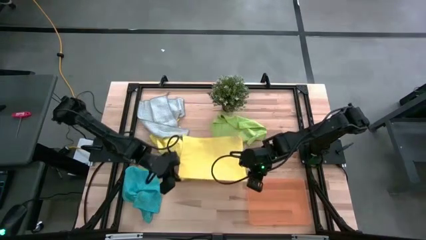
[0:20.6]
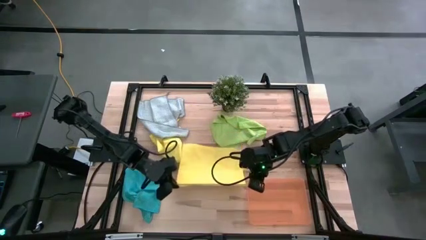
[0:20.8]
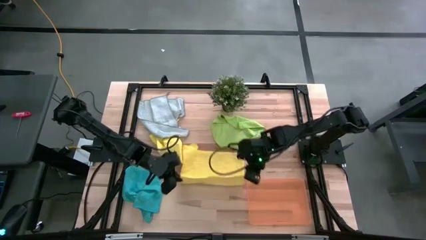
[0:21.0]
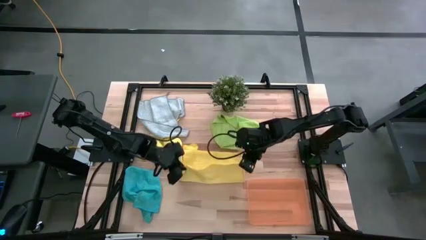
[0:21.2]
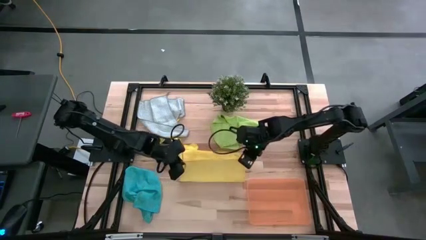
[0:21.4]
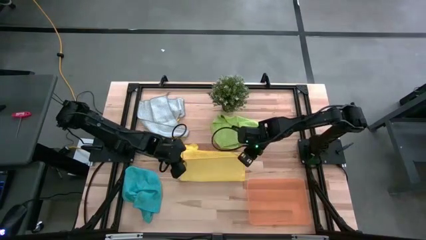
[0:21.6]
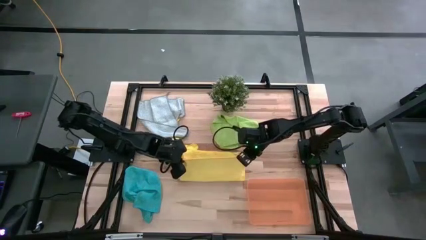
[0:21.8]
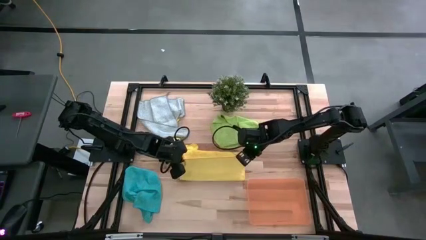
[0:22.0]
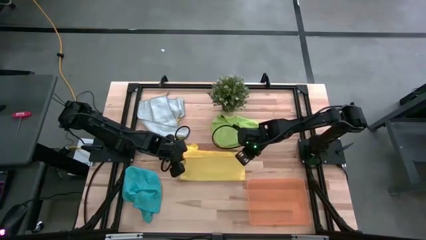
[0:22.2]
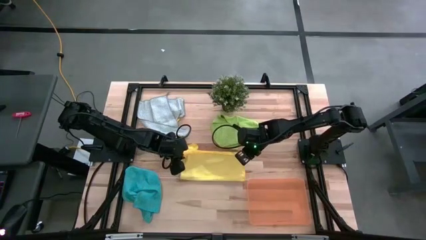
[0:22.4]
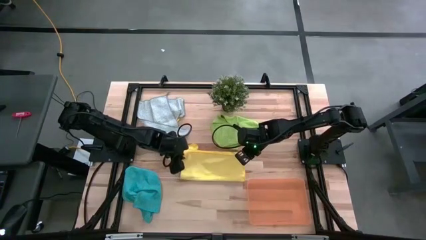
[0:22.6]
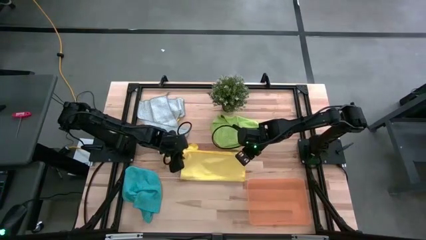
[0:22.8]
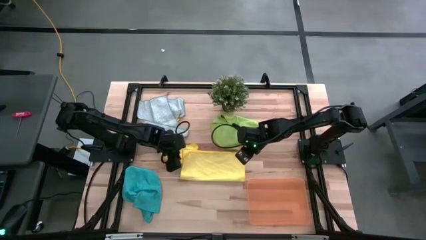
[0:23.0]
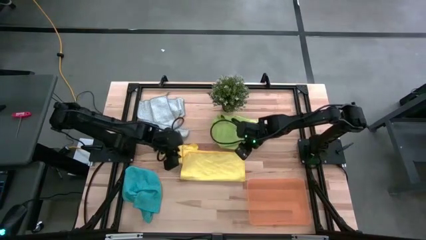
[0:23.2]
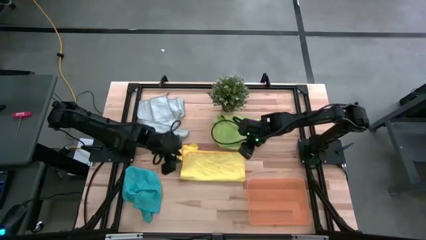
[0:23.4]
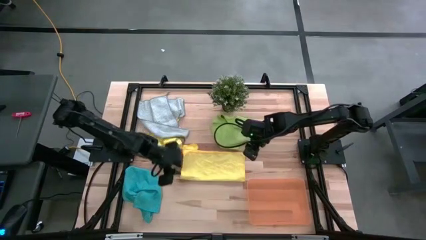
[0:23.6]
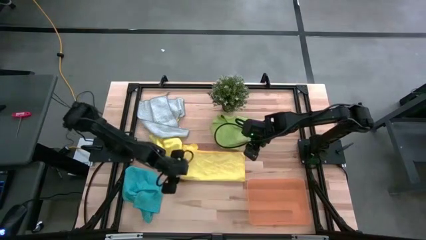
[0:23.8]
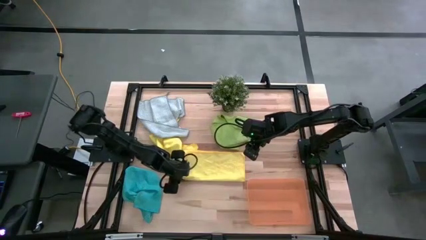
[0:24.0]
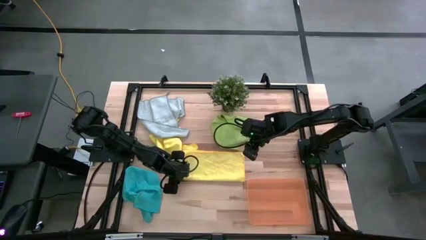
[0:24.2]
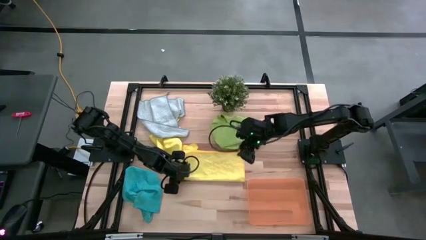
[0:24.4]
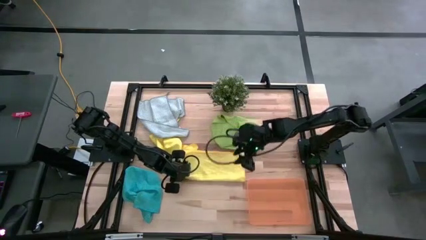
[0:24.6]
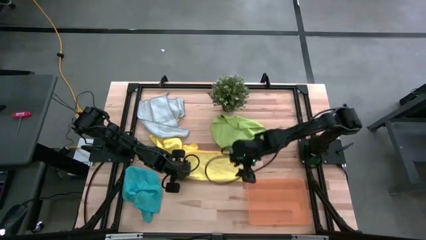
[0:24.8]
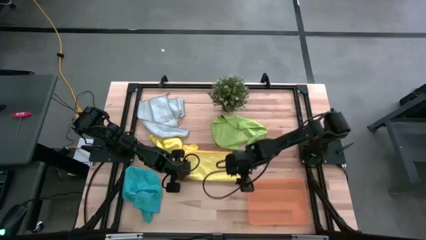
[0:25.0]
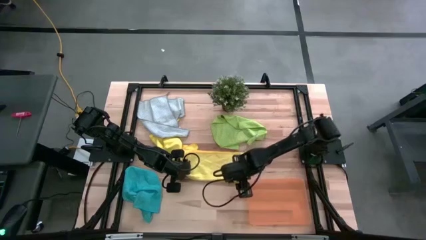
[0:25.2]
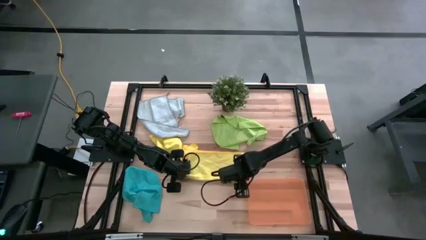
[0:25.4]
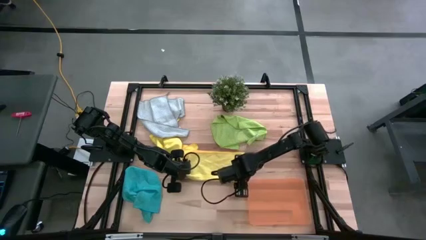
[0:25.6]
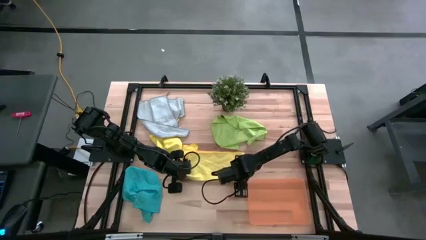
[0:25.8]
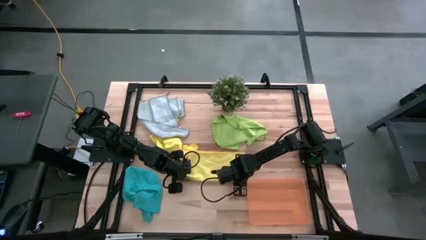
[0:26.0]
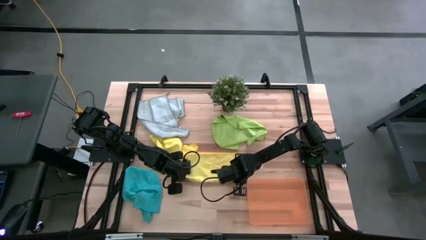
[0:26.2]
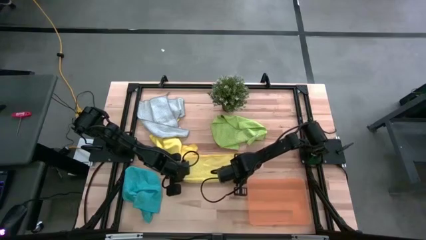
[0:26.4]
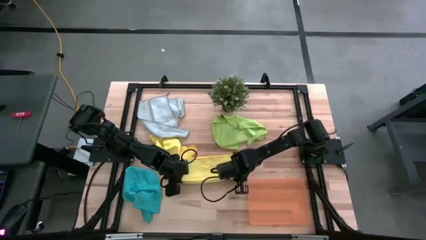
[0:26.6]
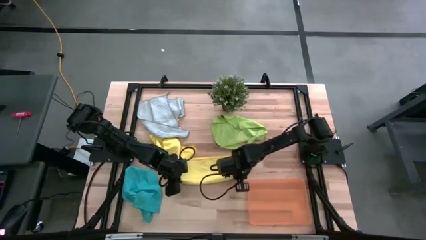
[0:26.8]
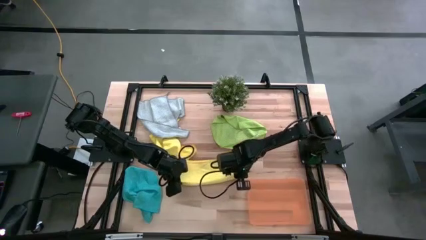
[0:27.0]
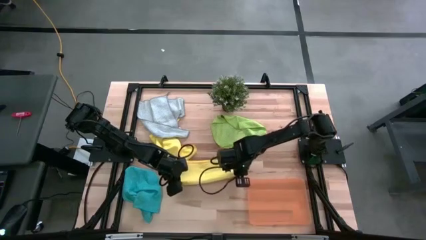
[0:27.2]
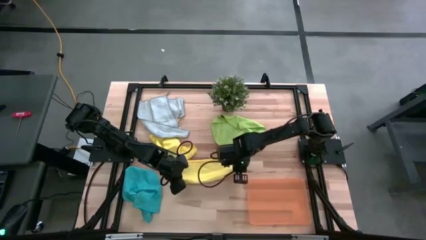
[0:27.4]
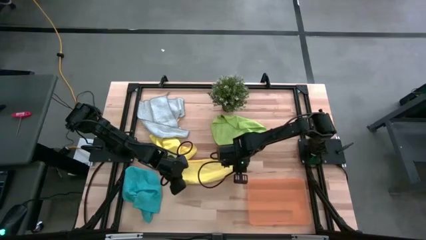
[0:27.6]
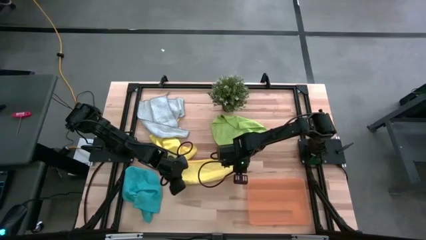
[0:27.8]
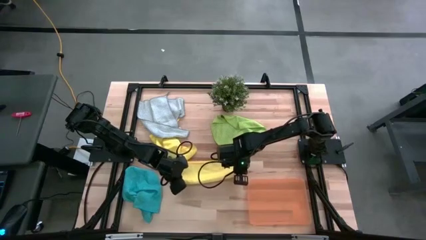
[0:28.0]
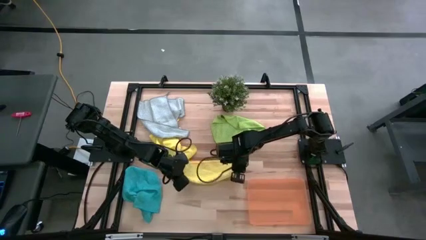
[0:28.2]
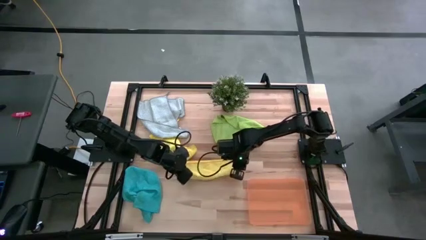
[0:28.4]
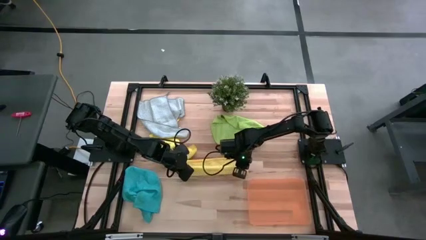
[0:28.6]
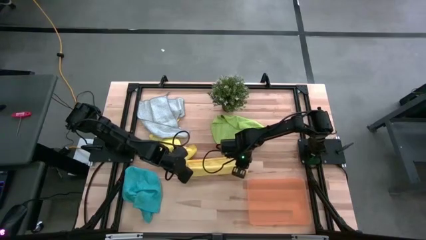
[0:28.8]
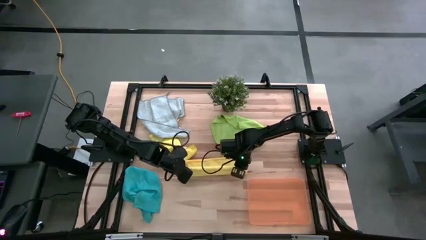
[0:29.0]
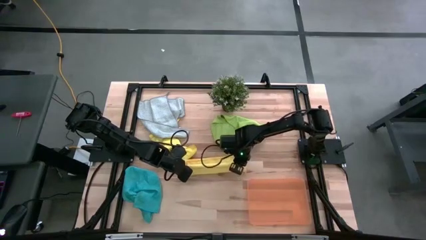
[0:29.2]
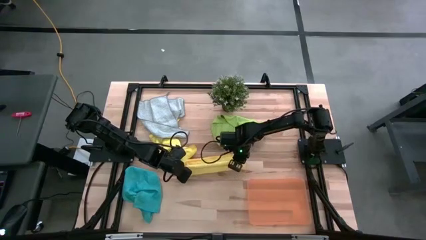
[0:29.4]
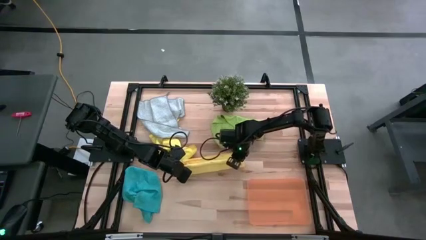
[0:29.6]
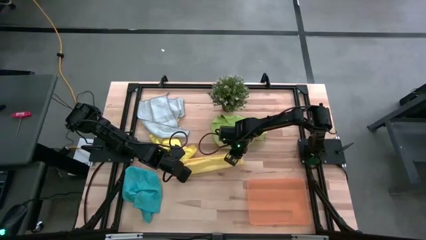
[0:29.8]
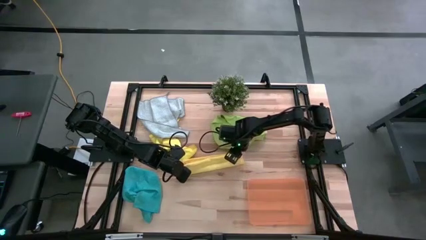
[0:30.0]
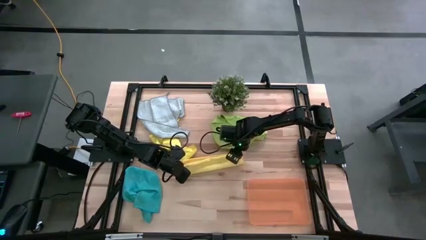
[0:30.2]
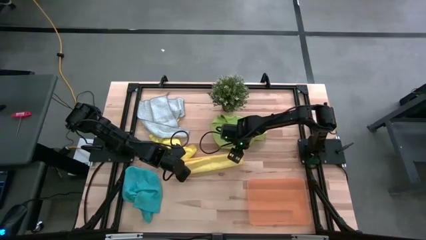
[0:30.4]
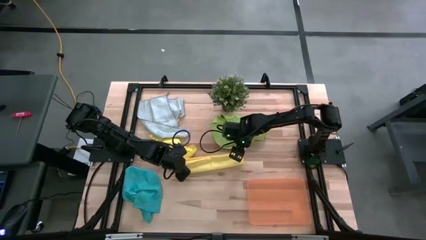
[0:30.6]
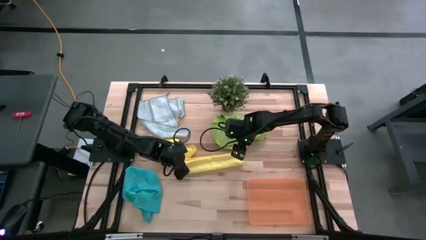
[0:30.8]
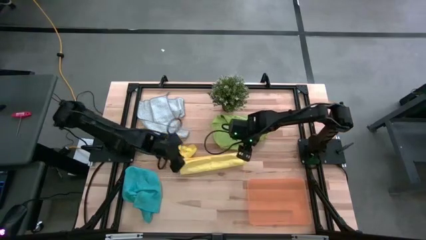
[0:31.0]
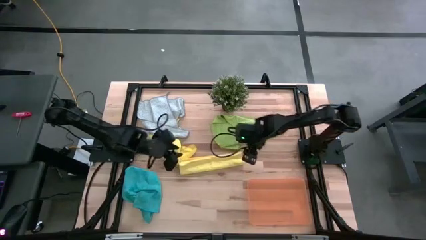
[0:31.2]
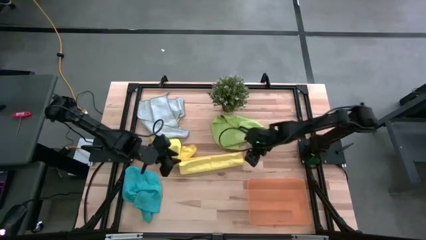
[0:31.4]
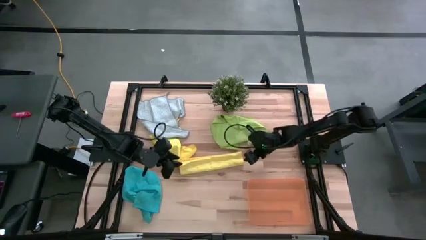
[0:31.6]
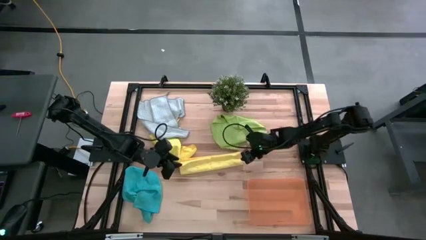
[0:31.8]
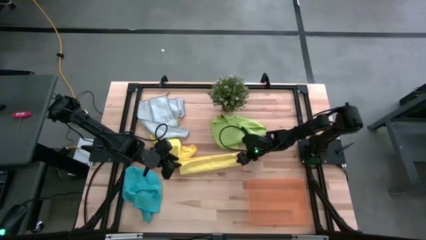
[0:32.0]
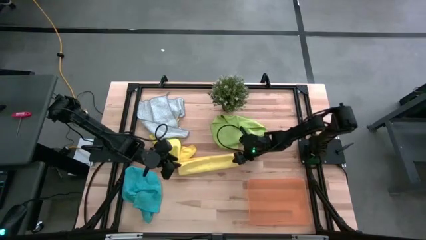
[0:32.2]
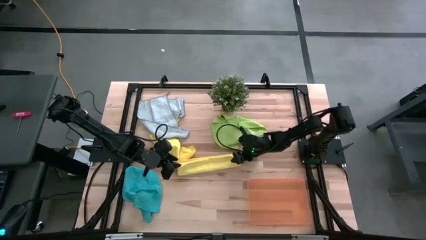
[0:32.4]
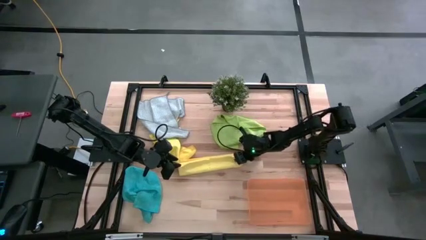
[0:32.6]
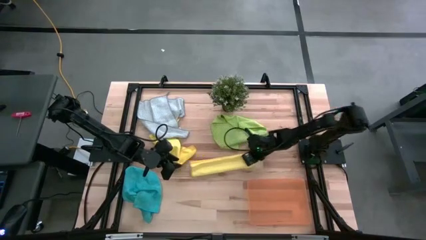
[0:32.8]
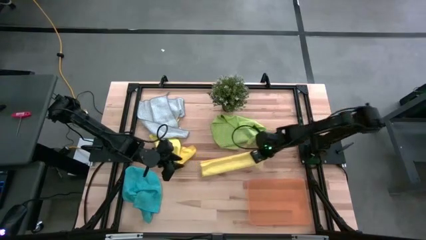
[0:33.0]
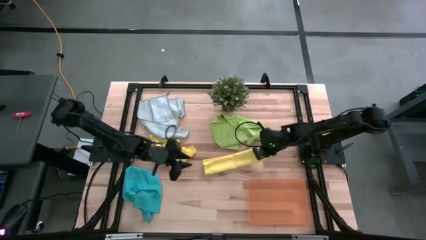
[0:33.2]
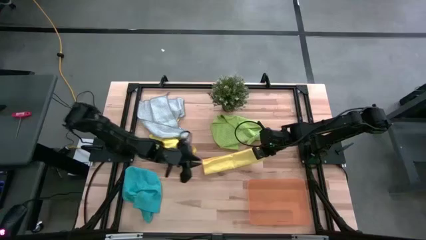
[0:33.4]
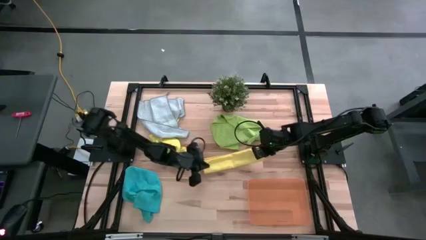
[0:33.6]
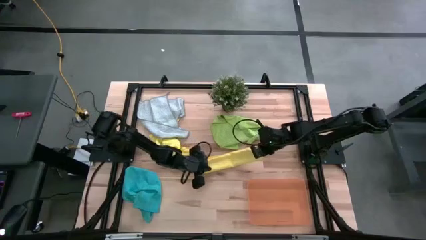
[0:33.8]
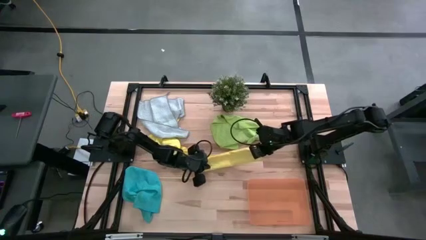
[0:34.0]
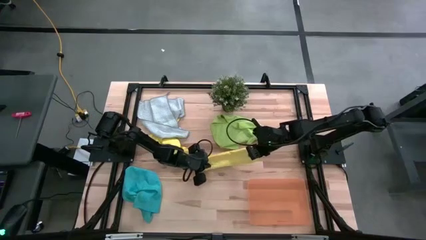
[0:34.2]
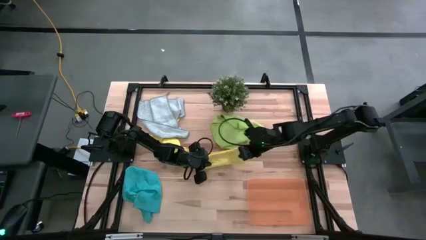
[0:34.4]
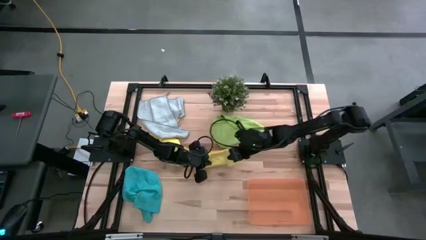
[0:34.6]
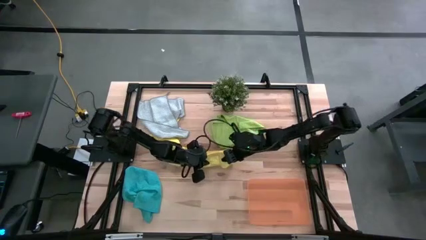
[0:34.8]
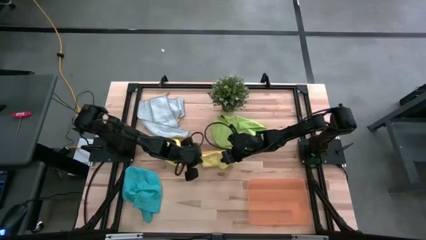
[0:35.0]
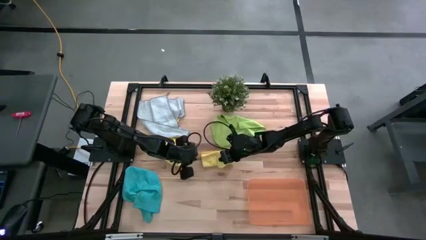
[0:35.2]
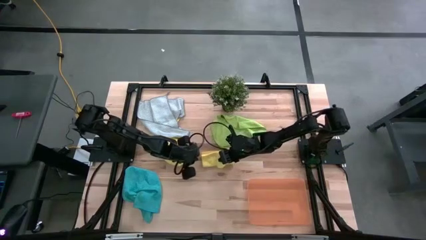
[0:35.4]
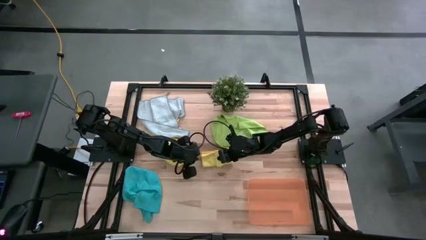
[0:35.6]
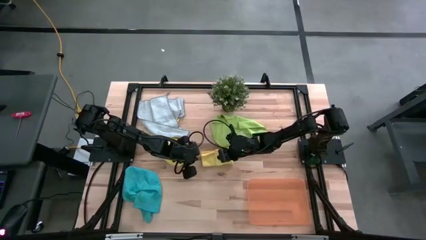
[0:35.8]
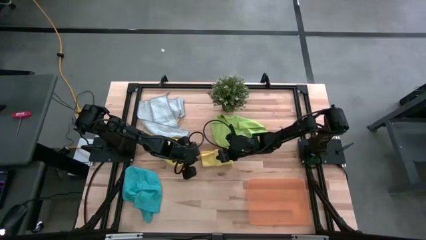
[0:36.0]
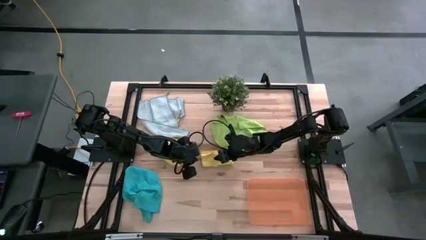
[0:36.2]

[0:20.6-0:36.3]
Task: Fold microfiber towels
Fold the right yellow microfiber towel
